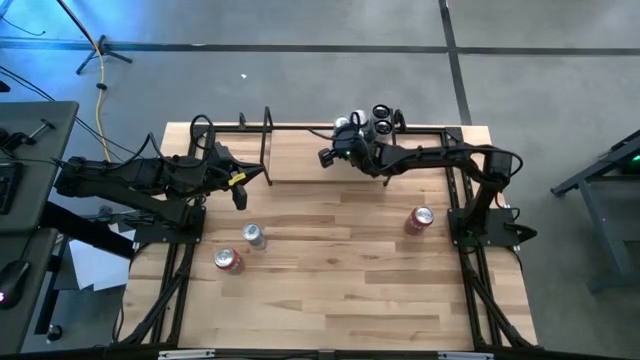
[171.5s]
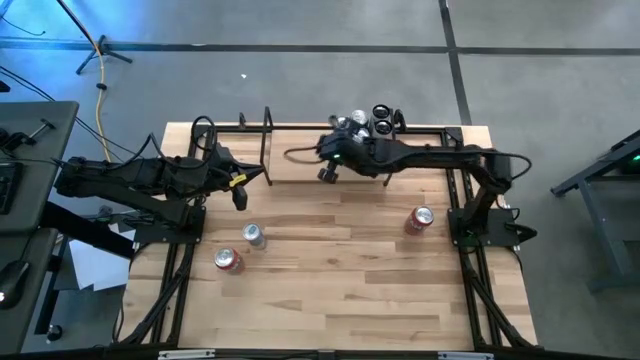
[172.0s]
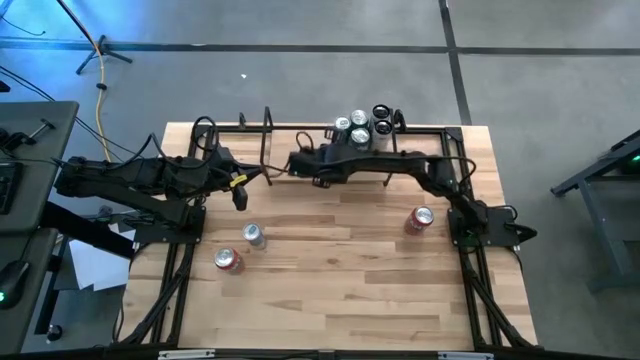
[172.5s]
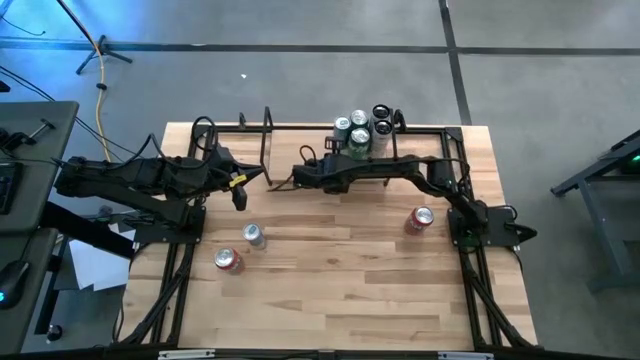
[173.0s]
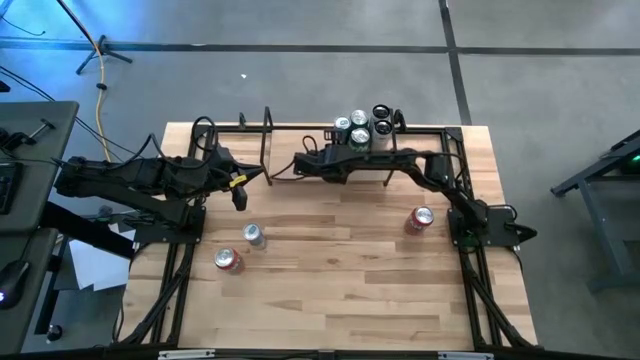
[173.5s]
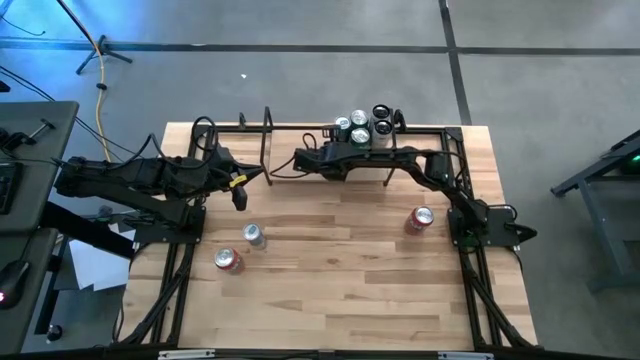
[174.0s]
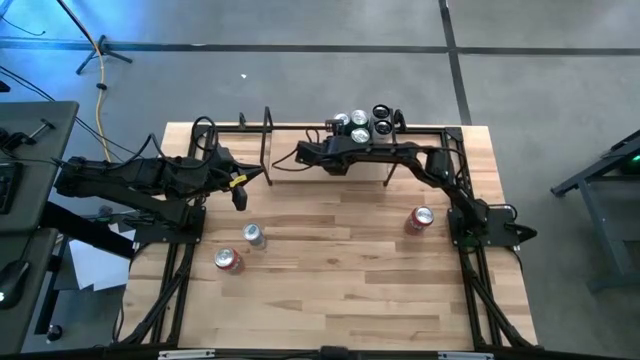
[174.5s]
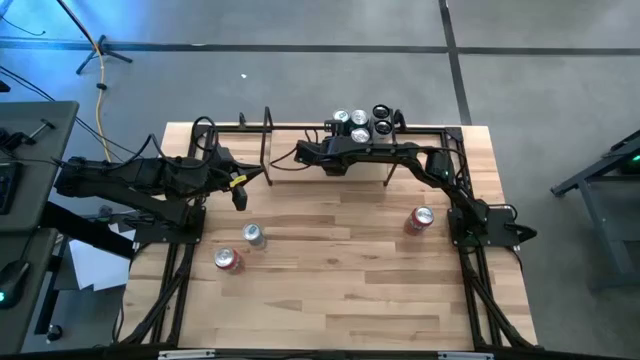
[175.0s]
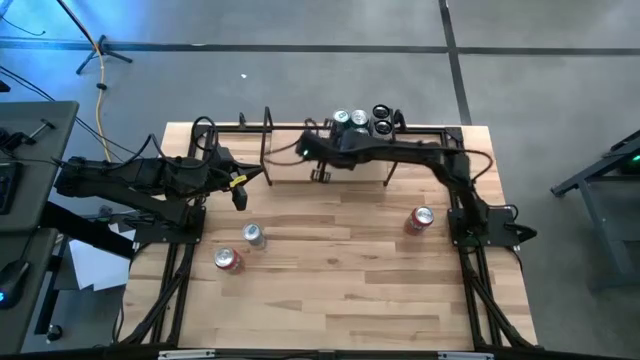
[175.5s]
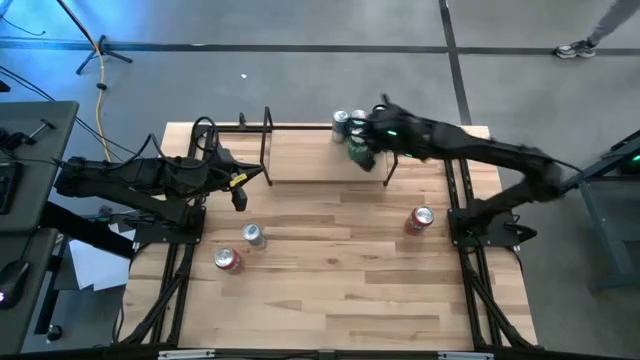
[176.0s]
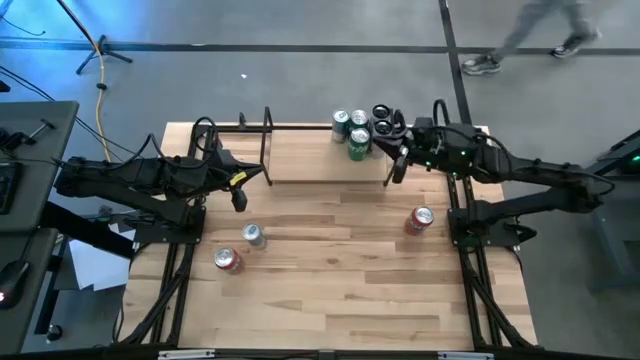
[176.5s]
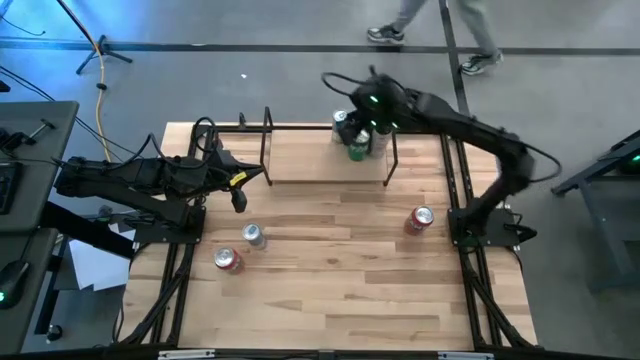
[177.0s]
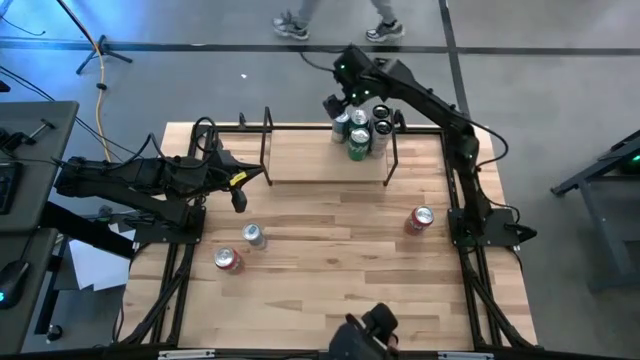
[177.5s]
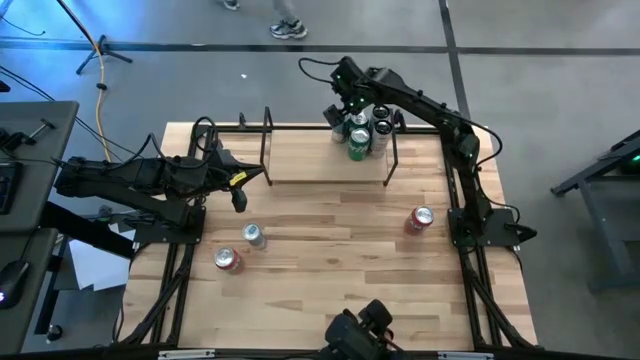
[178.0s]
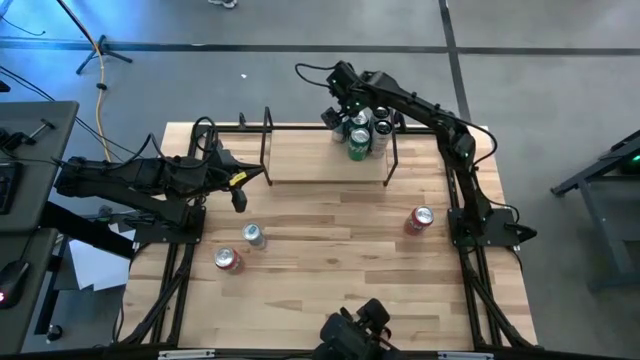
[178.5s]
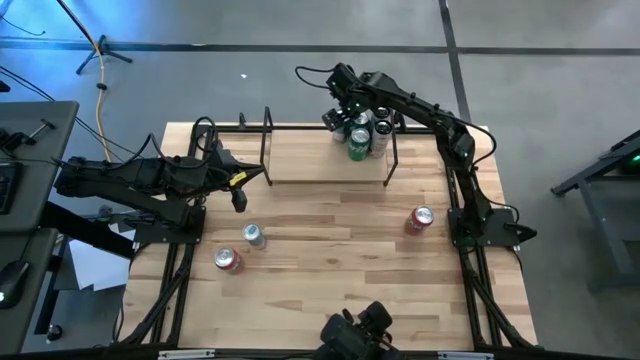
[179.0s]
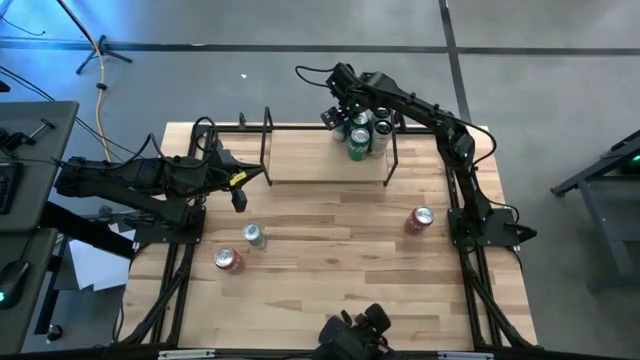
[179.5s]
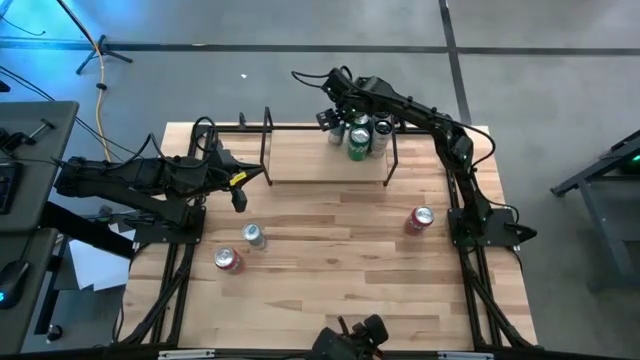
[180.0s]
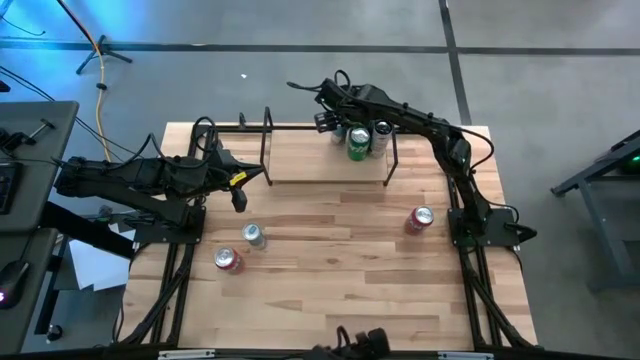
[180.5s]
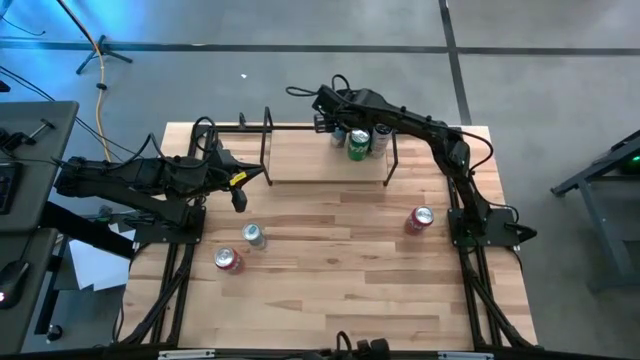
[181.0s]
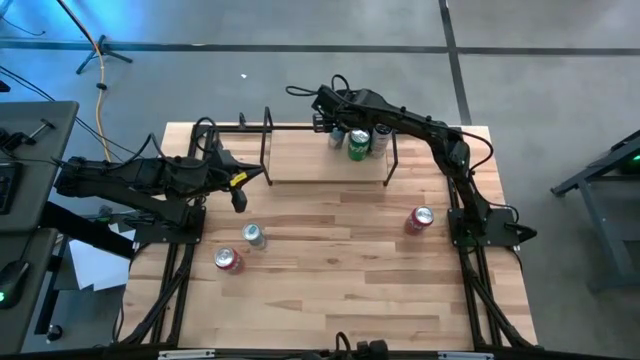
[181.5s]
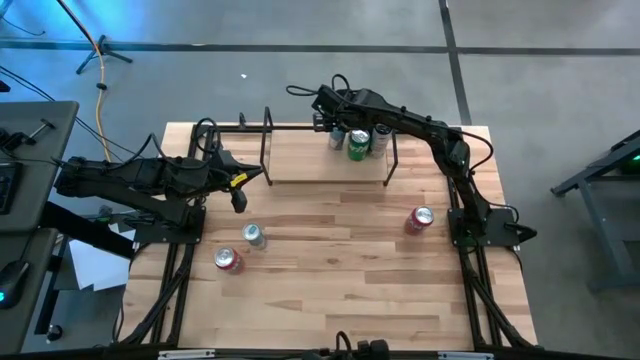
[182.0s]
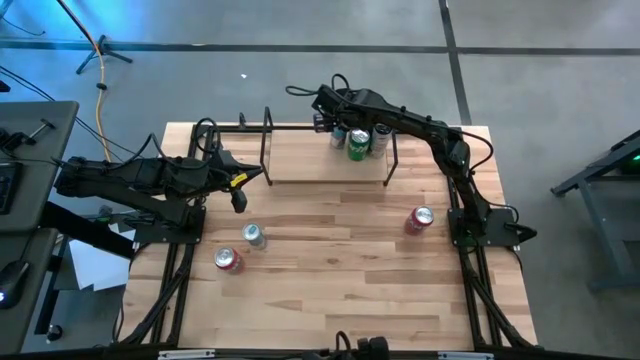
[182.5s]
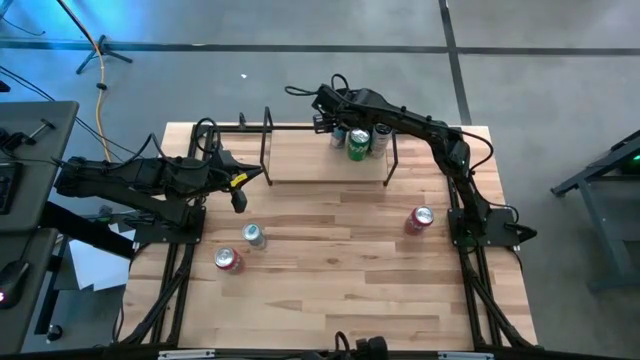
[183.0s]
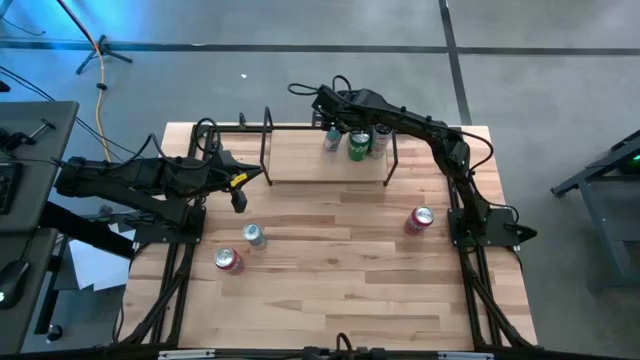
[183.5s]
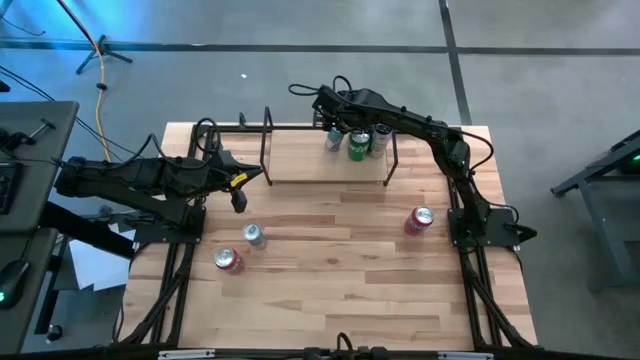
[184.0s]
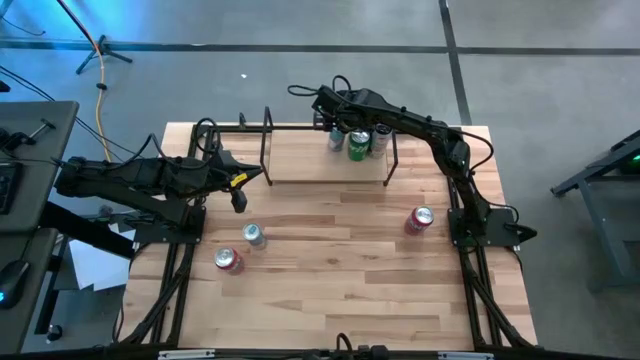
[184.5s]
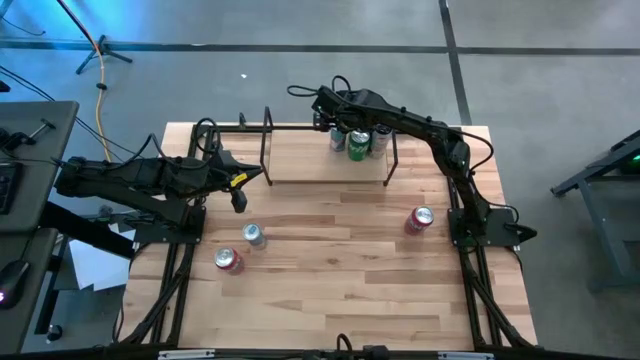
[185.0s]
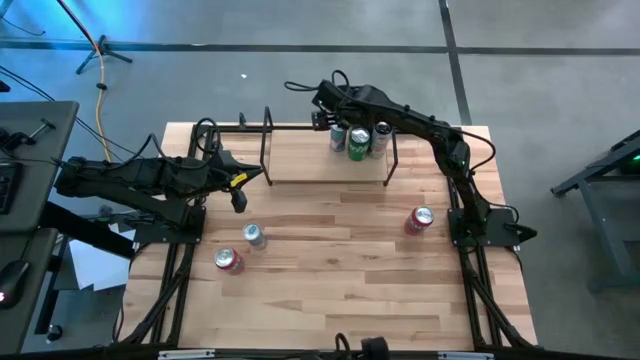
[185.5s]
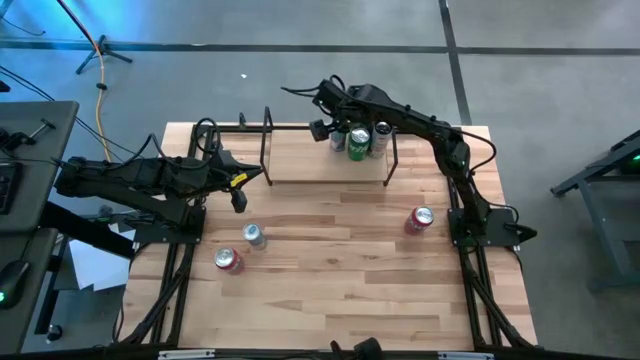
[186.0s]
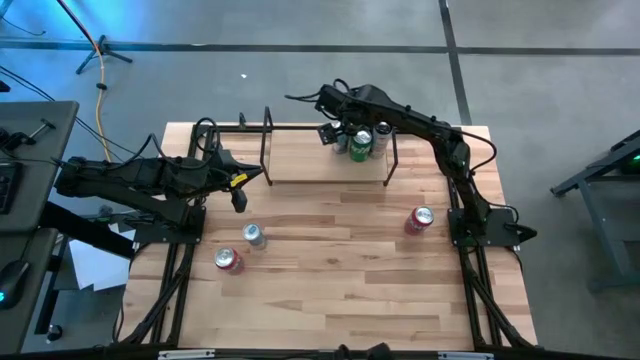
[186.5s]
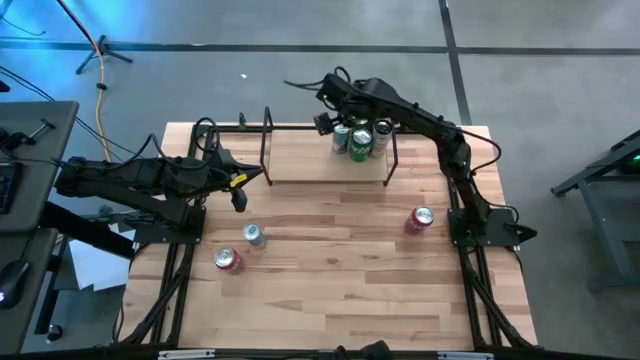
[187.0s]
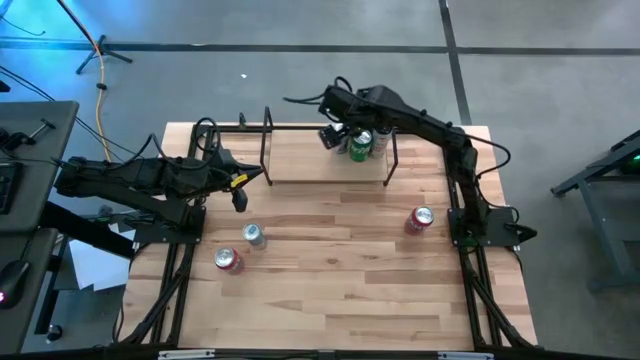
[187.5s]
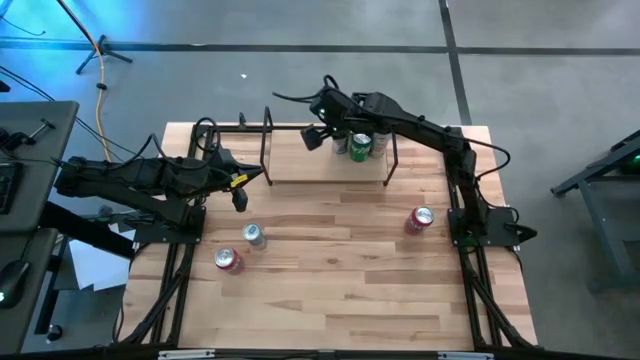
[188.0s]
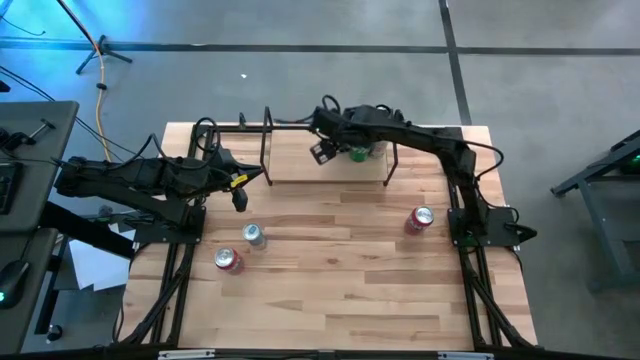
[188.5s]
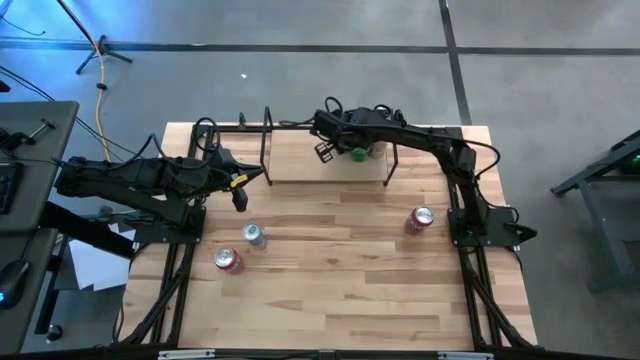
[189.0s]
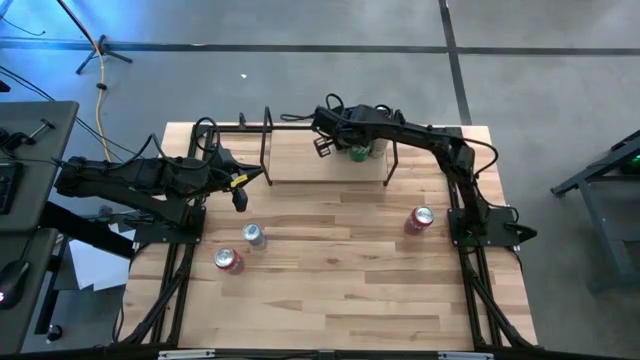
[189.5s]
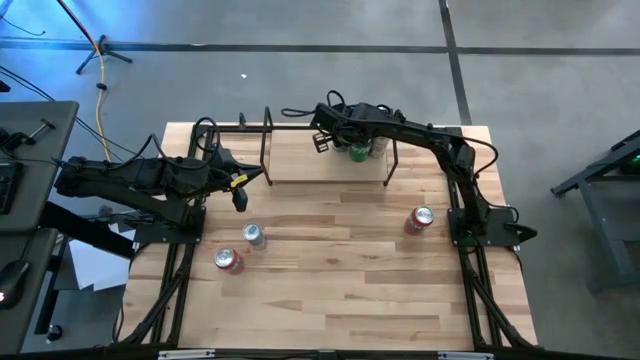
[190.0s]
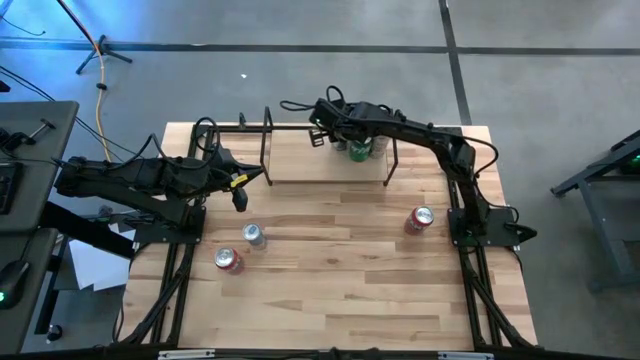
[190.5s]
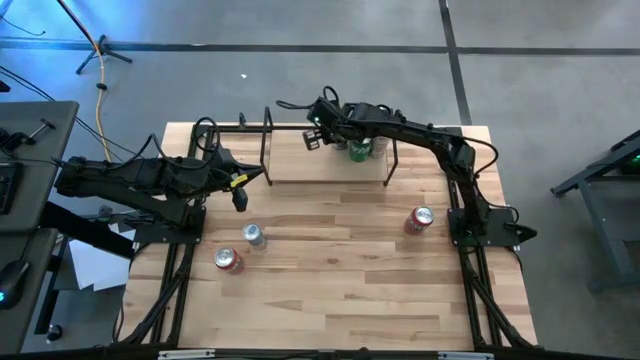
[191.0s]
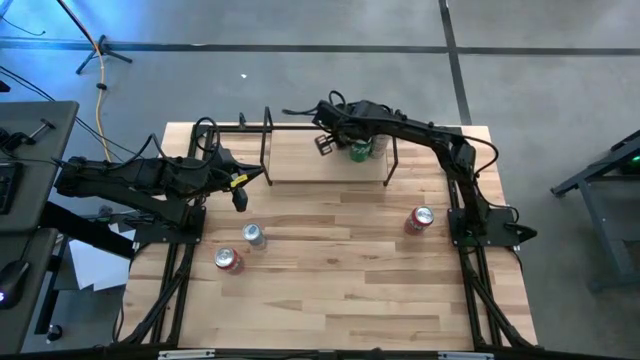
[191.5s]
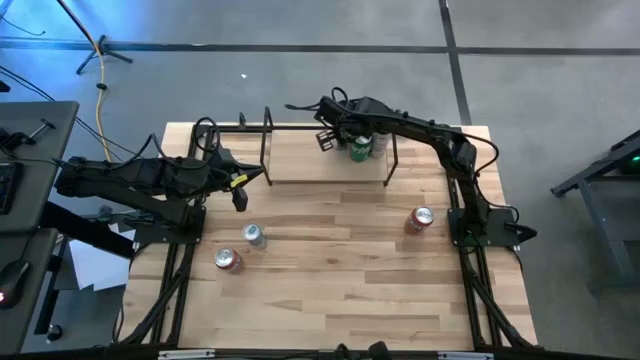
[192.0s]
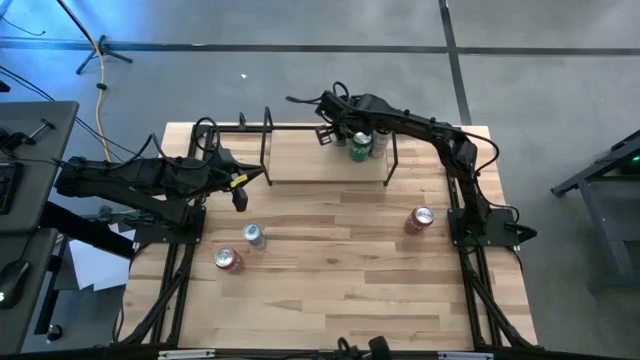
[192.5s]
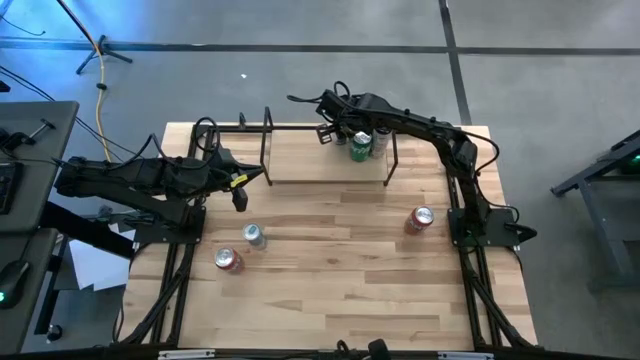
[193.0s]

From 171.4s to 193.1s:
Task: Place canned beverage on shelf
Put the right blue soda can on the shelf
